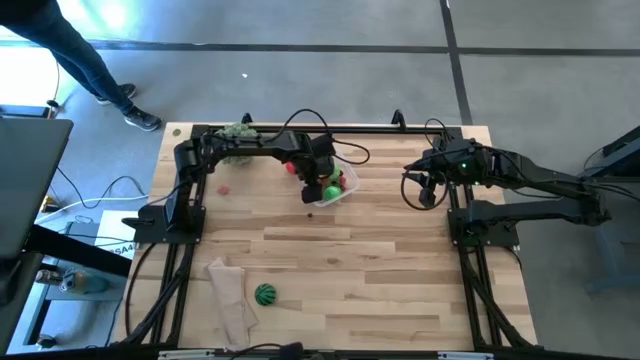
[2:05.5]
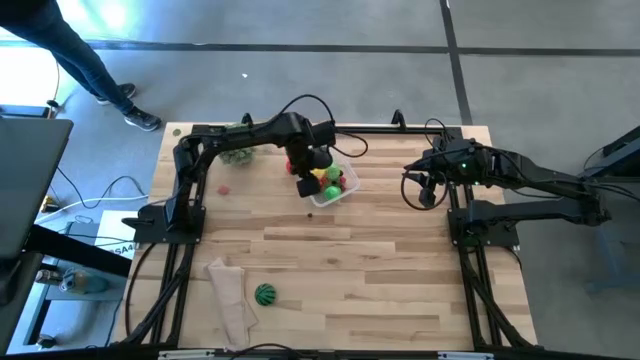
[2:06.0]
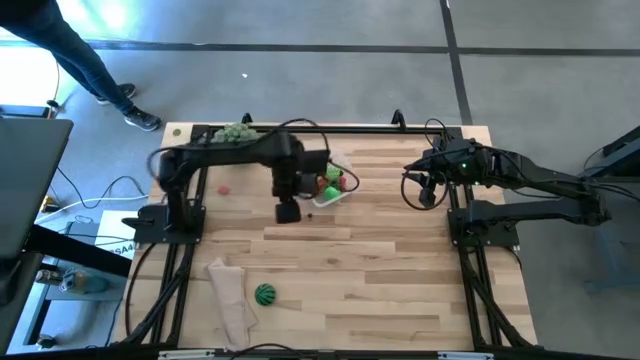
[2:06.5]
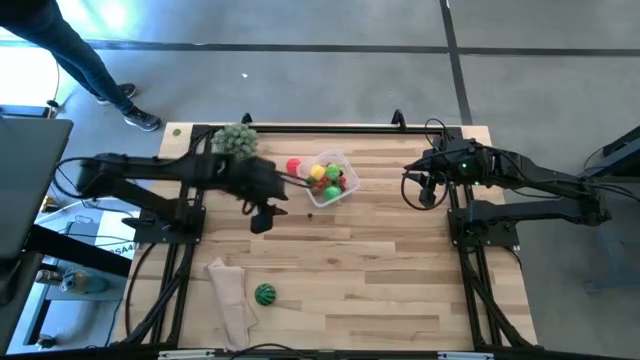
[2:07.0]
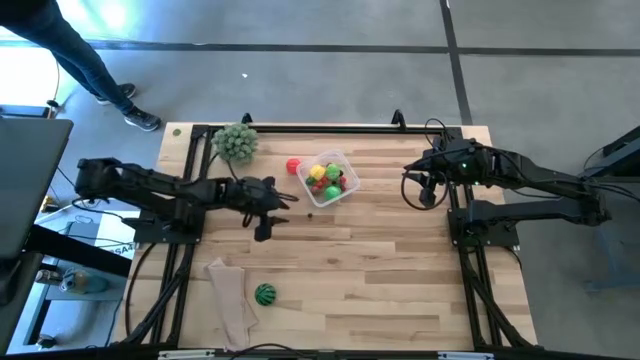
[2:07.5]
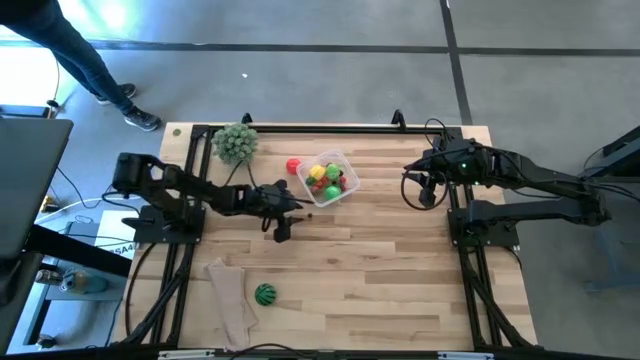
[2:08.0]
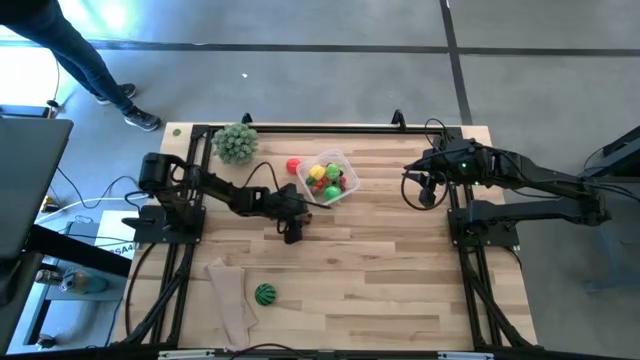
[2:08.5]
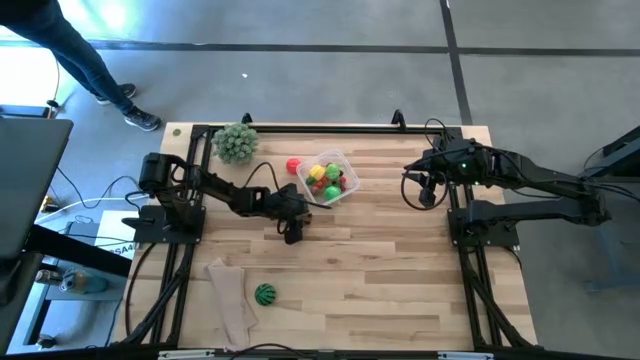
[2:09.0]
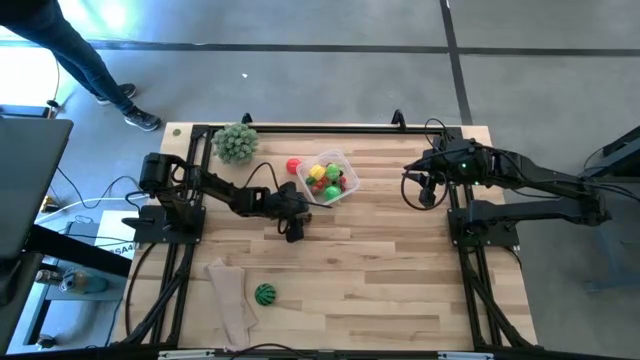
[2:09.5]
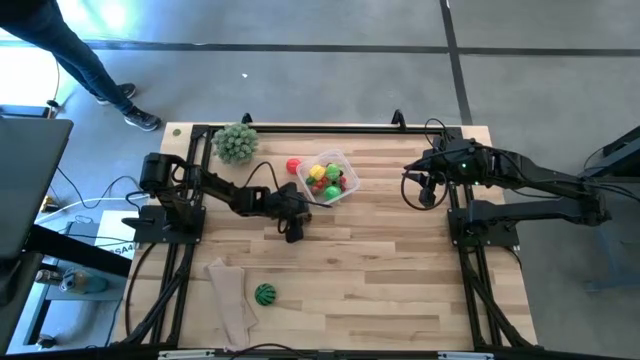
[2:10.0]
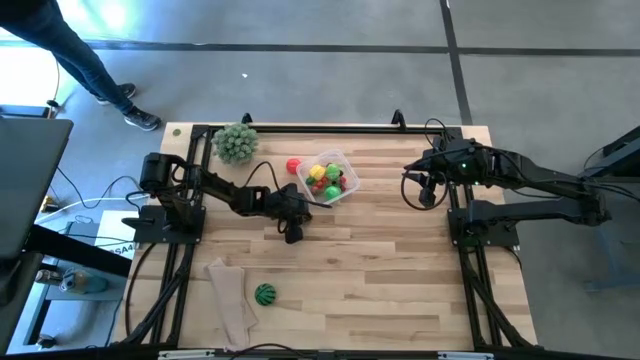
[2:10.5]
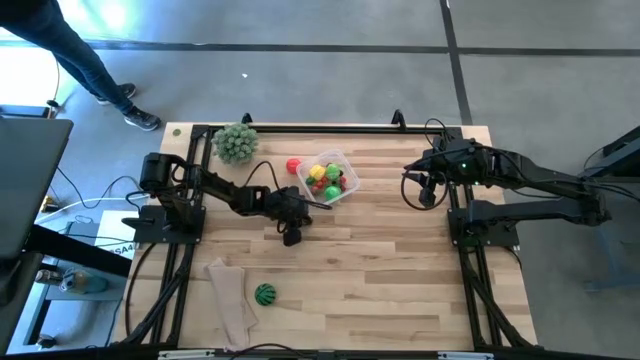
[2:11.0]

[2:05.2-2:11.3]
Task: Pick and placing Produce into tupperware
Put the blueberry into the transparent container

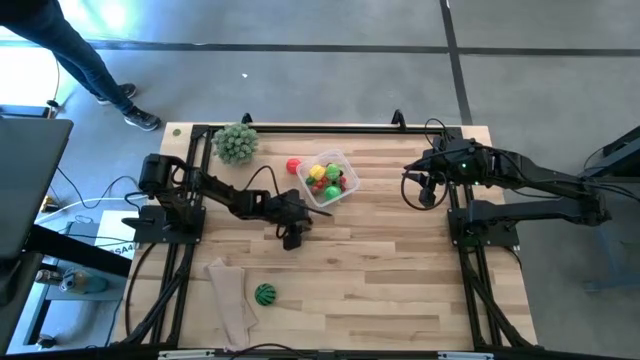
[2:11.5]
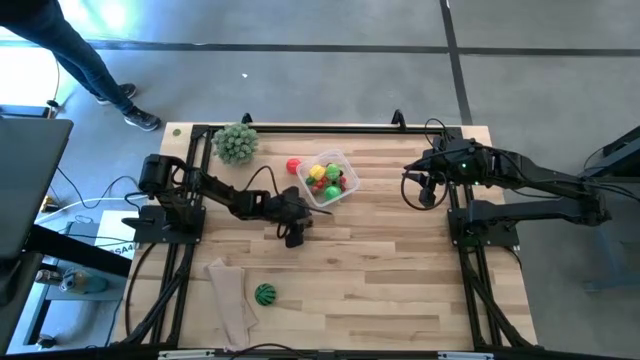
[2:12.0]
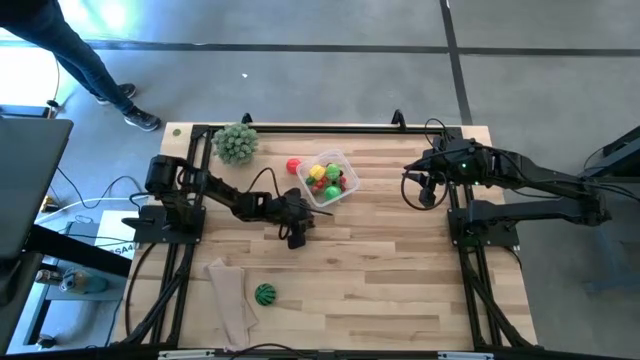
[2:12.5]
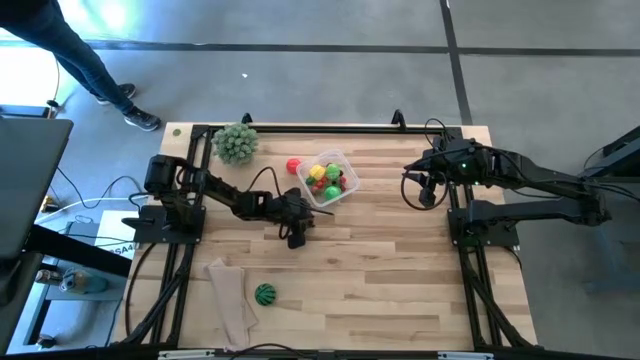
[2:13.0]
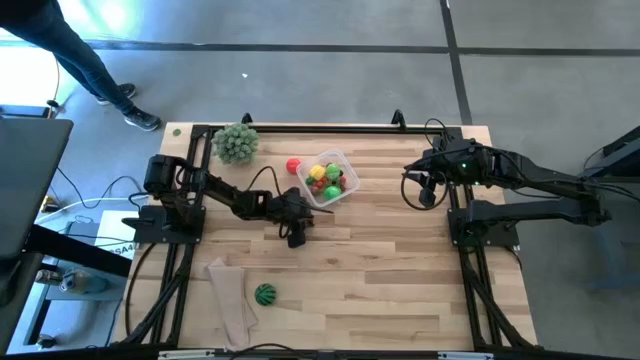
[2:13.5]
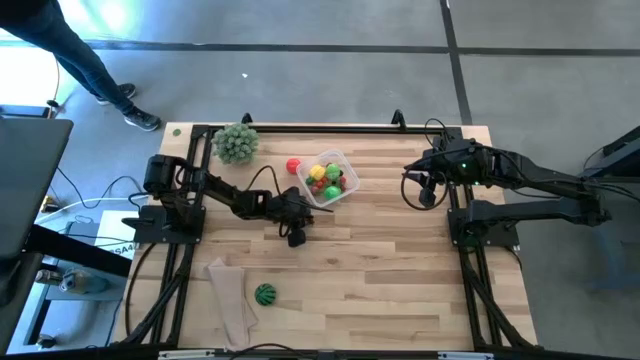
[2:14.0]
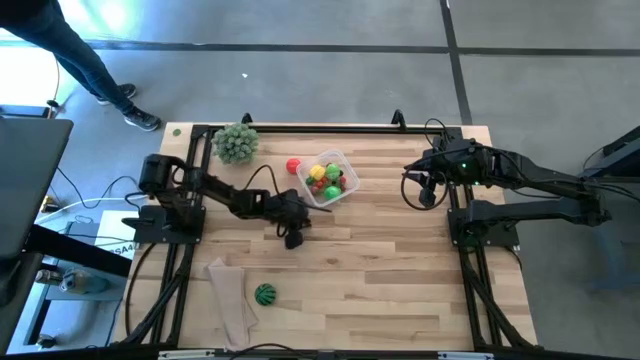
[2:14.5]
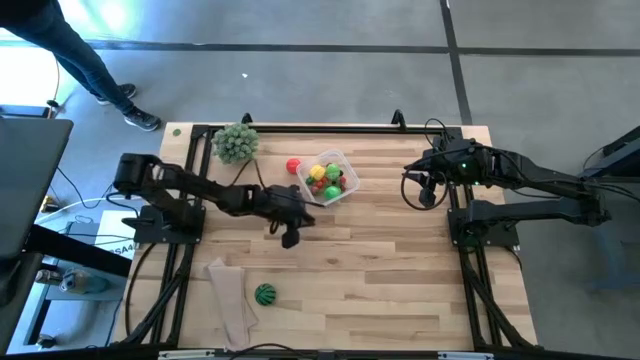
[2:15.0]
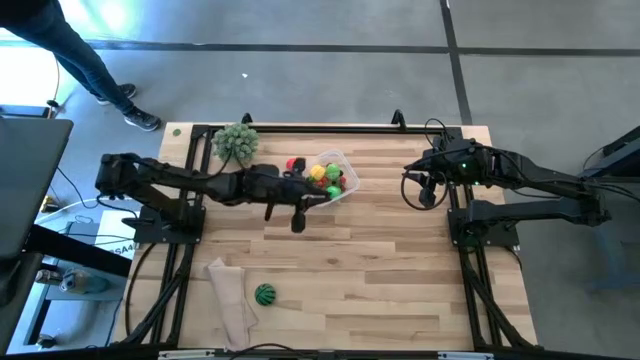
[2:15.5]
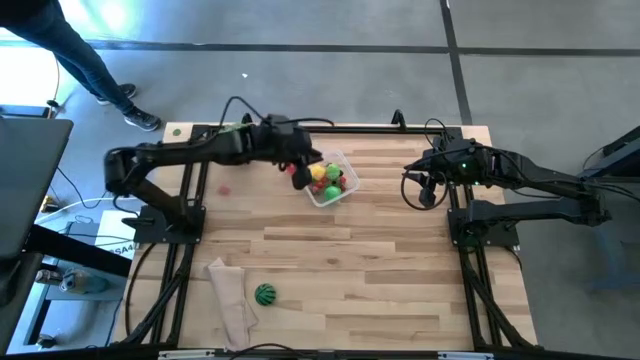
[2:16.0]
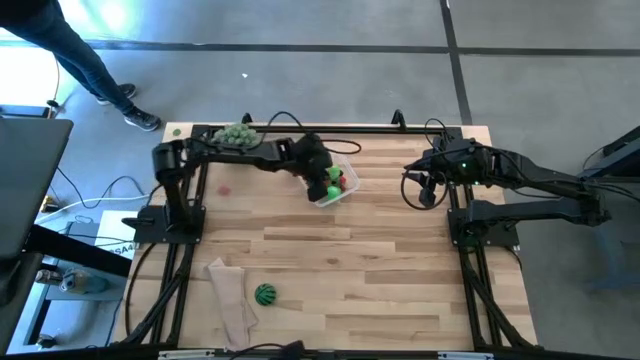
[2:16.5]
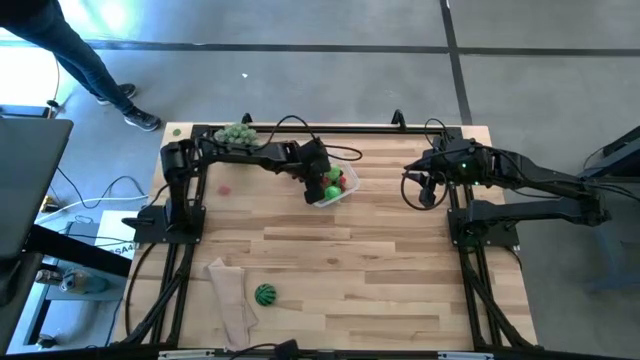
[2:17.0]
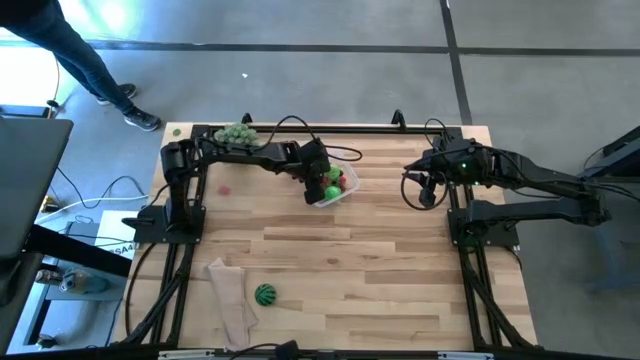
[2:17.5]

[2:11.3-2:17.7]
Put the blueberry into the transparent container

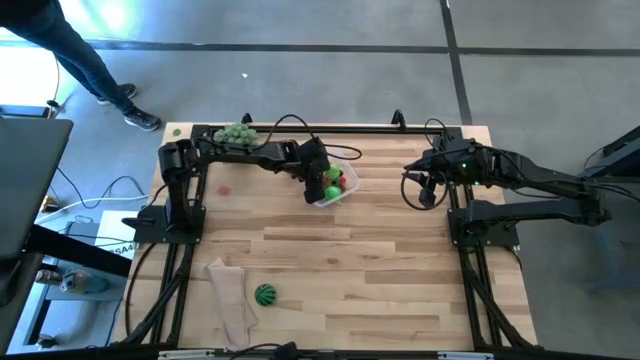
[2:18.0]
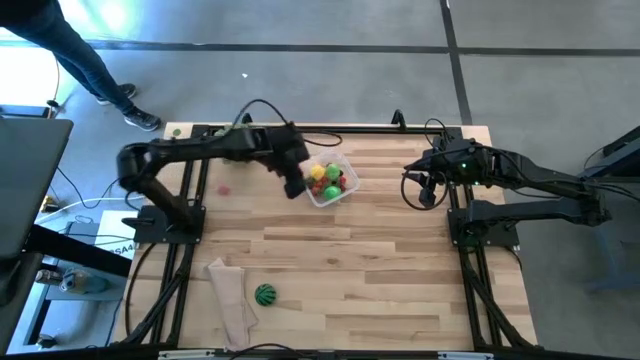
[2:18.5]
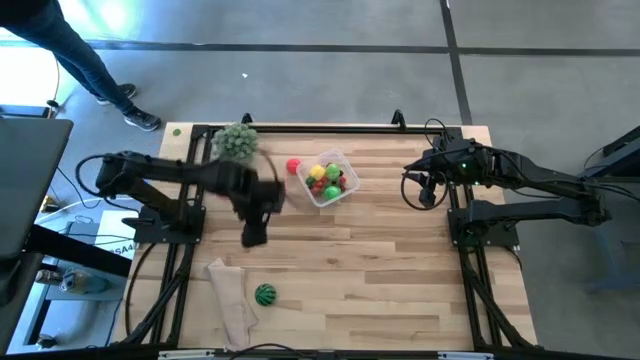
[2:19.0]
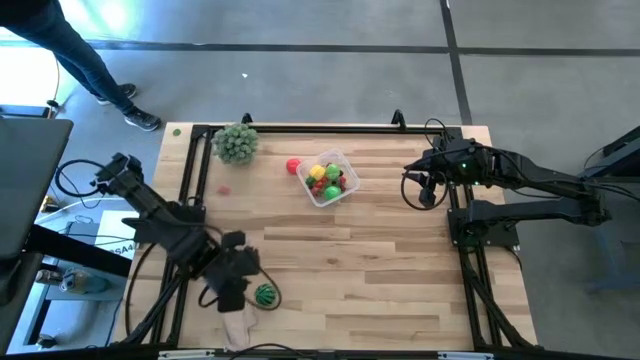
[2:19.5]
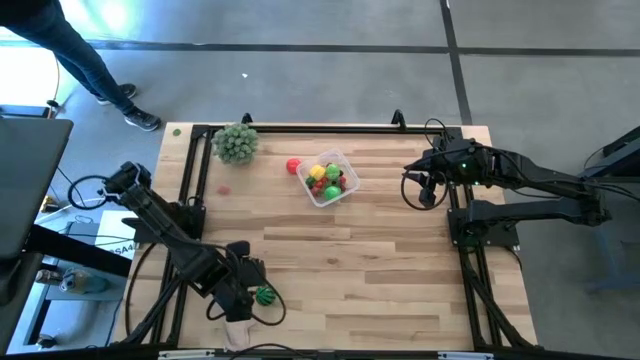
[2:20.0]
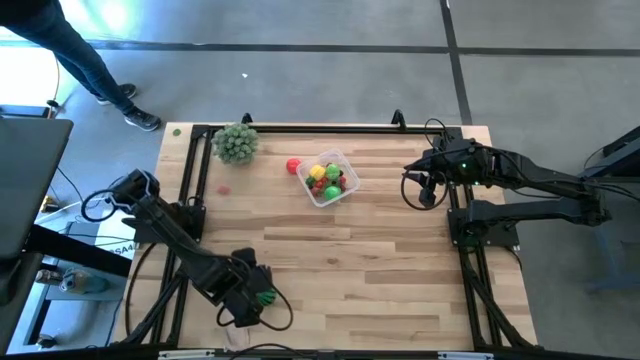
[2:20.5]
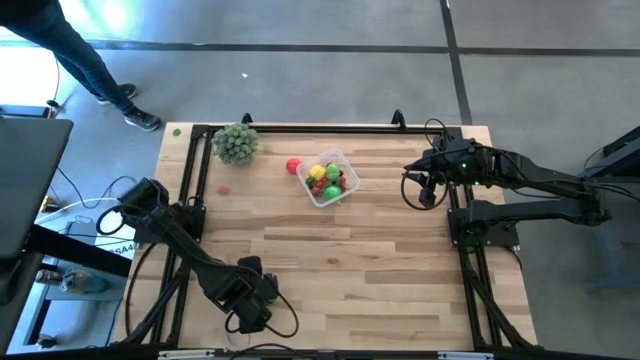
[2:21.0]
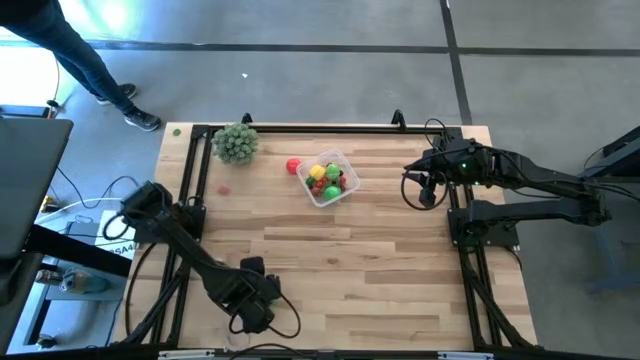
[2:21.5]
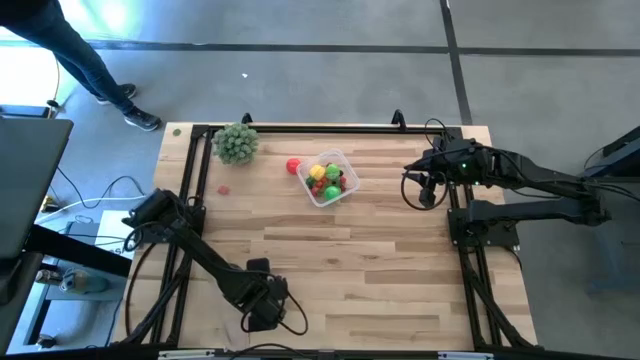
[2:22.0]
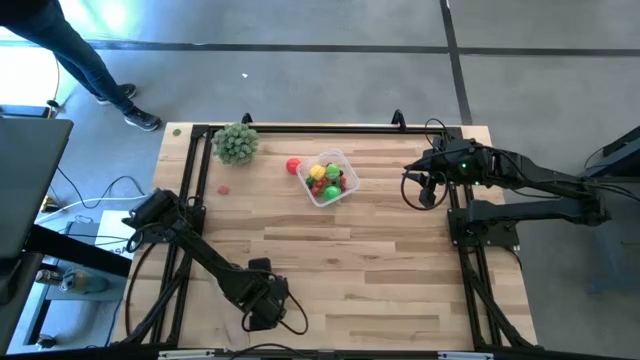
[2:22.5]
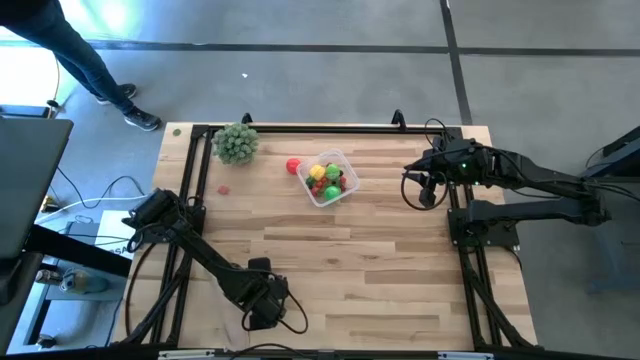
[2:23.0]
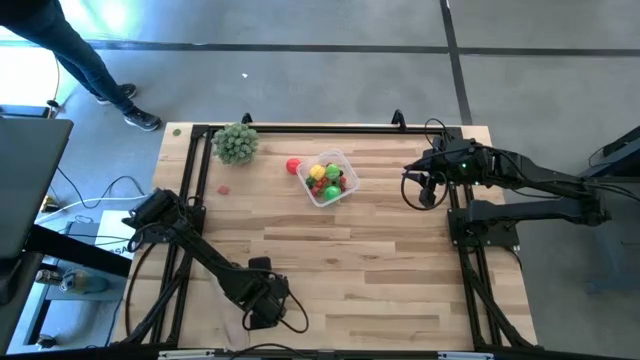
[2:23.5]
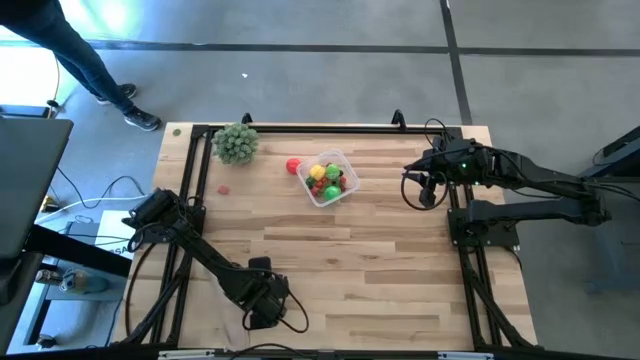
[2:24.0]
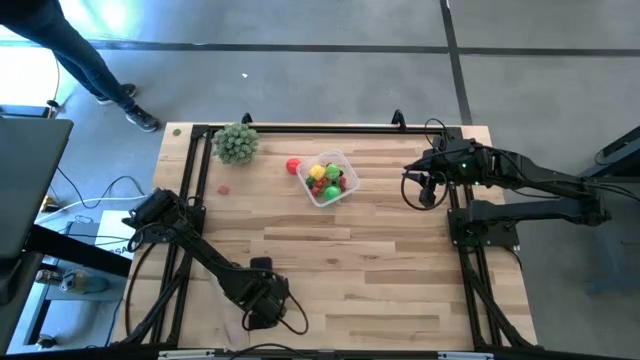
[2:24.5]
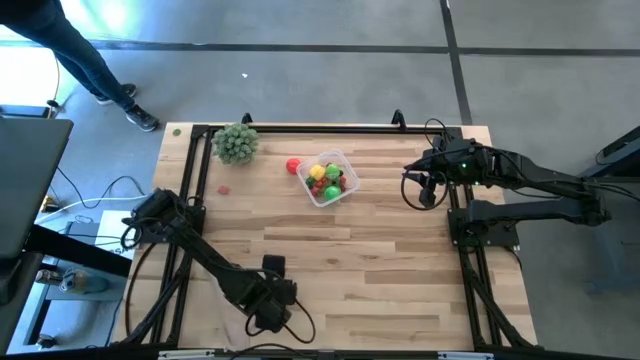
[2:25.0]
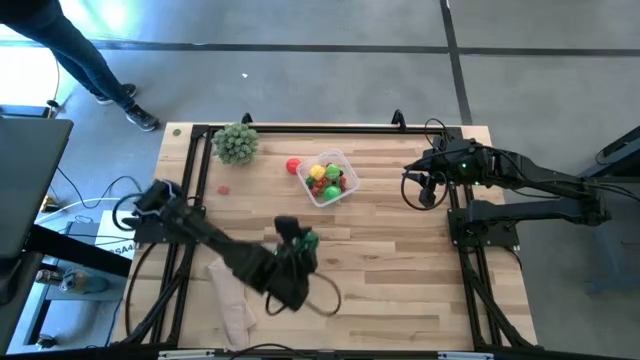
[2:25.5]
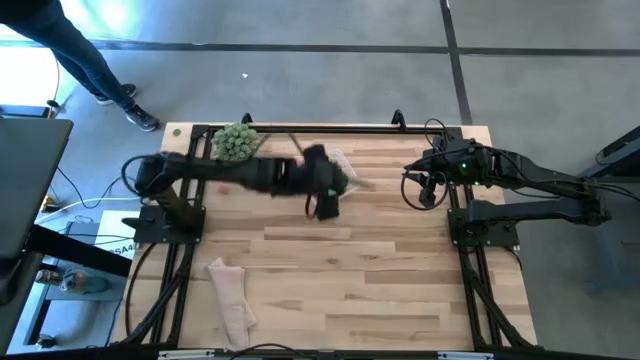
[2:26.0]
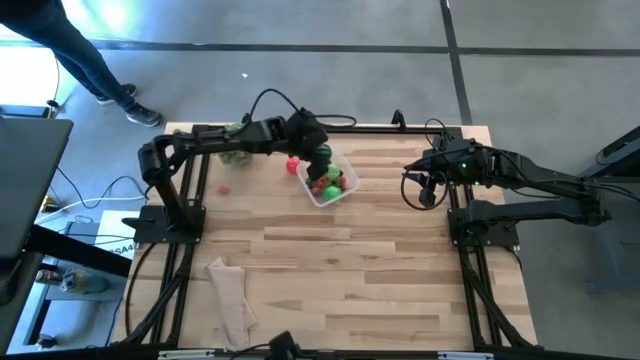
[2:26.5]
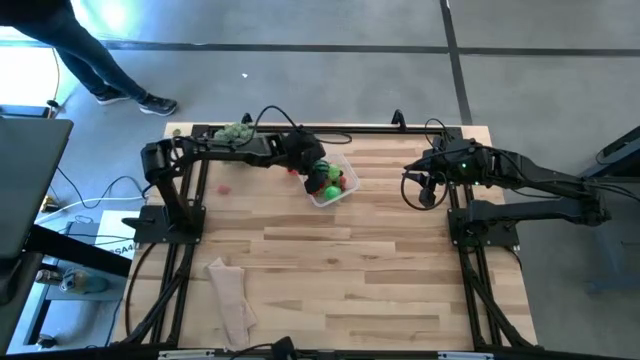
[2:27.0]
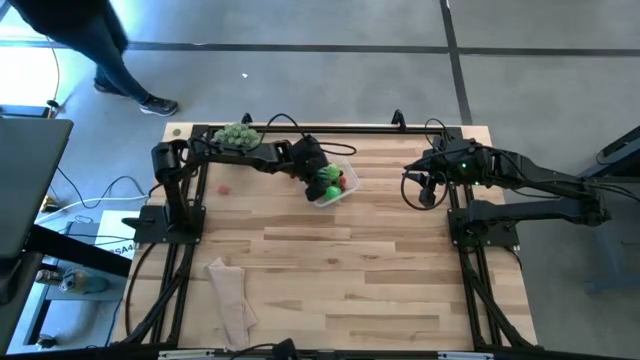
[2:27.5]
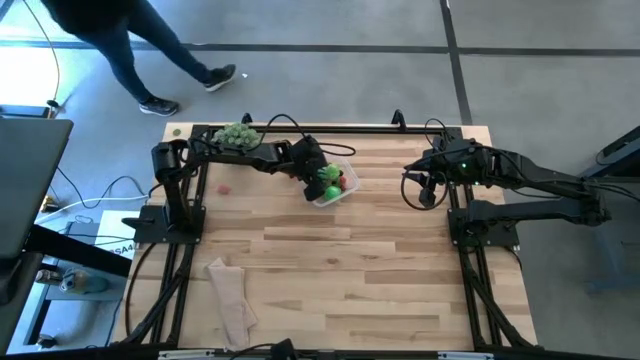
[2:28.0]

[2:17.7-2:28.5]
Put the green watermelon into the transparent container
